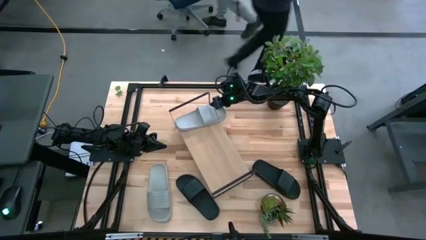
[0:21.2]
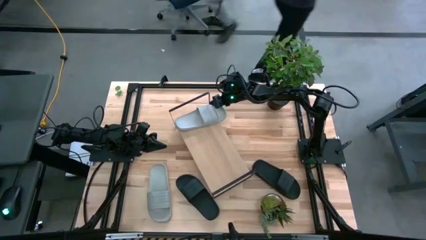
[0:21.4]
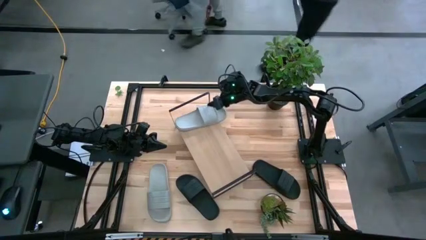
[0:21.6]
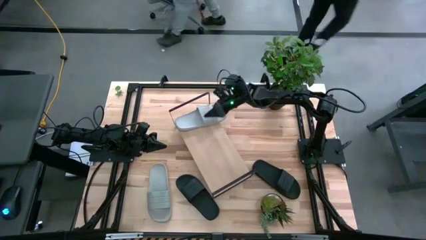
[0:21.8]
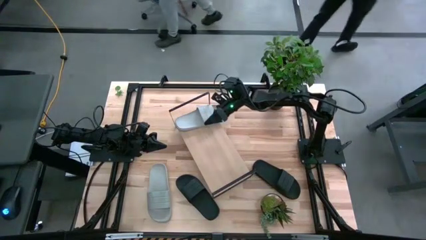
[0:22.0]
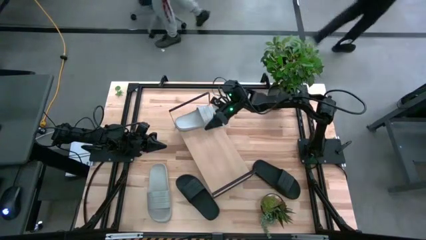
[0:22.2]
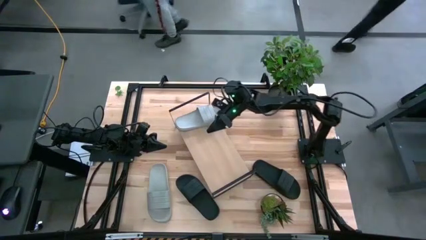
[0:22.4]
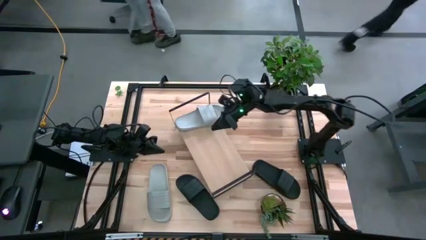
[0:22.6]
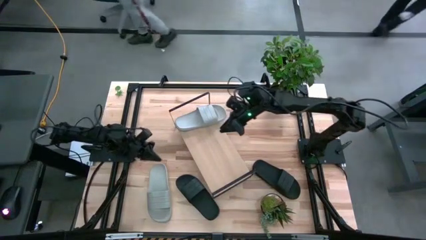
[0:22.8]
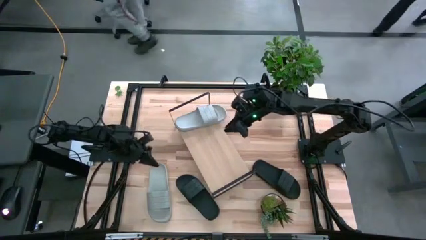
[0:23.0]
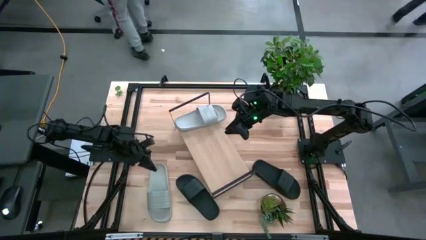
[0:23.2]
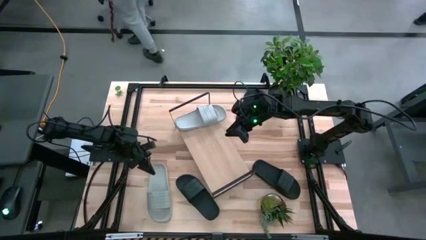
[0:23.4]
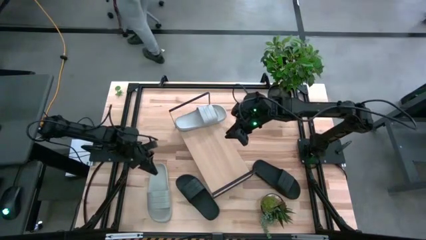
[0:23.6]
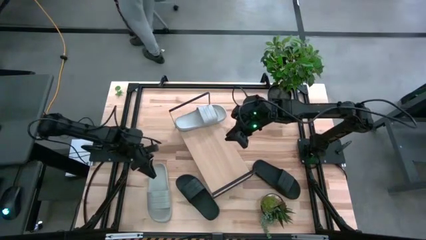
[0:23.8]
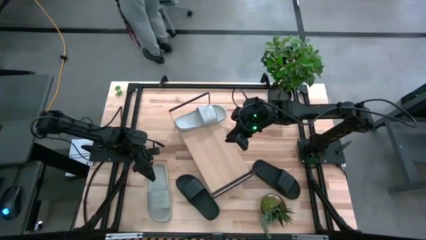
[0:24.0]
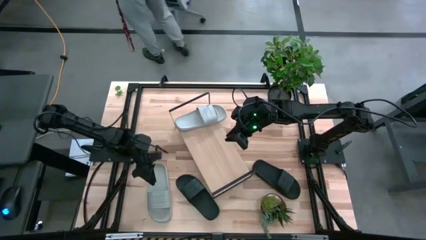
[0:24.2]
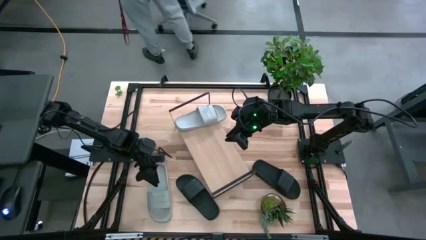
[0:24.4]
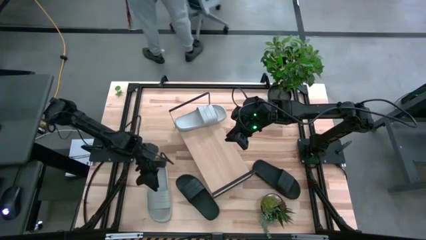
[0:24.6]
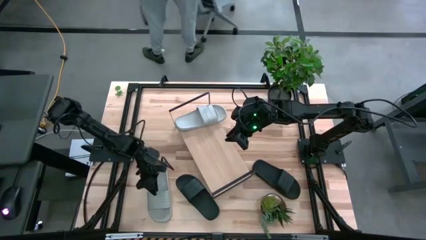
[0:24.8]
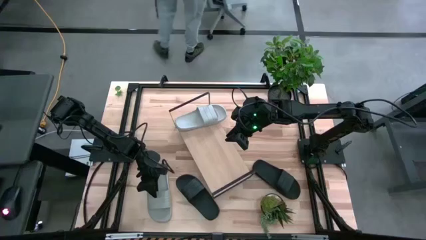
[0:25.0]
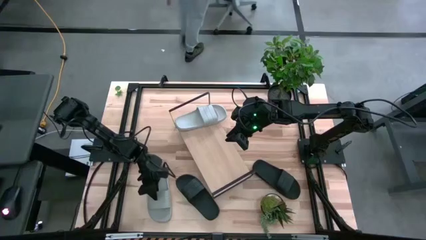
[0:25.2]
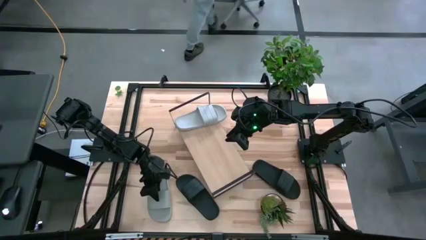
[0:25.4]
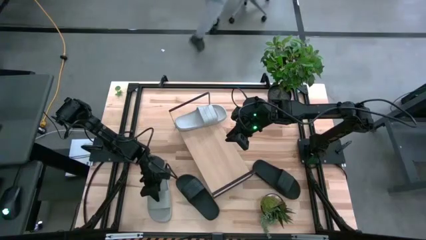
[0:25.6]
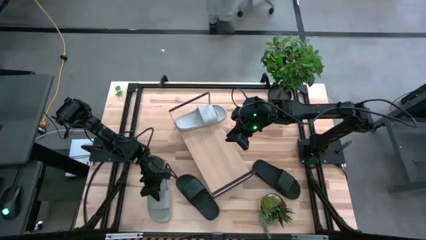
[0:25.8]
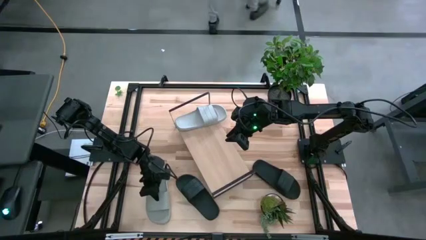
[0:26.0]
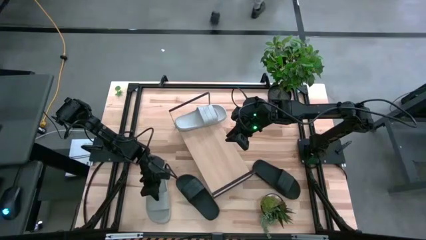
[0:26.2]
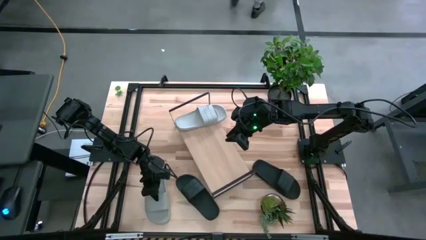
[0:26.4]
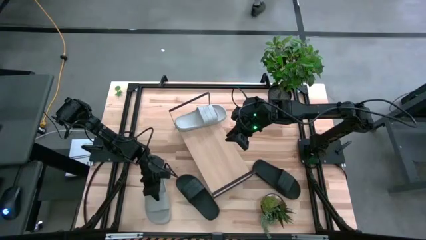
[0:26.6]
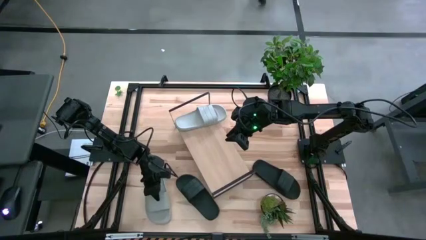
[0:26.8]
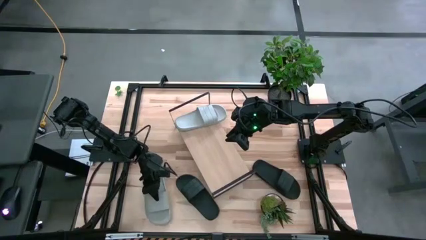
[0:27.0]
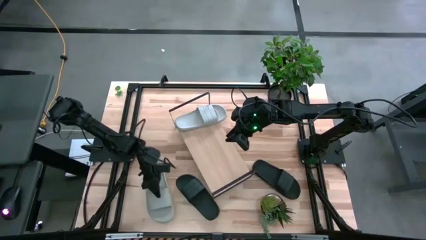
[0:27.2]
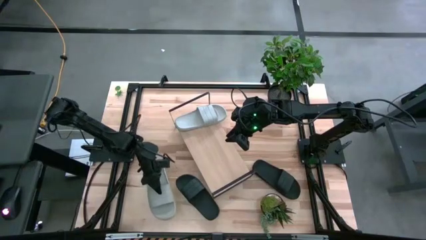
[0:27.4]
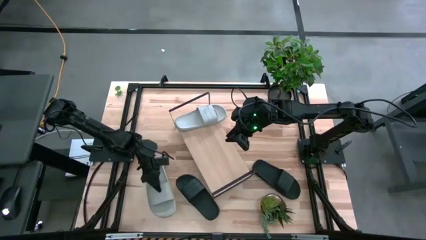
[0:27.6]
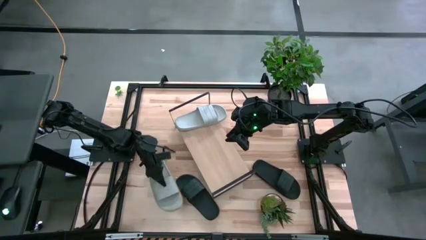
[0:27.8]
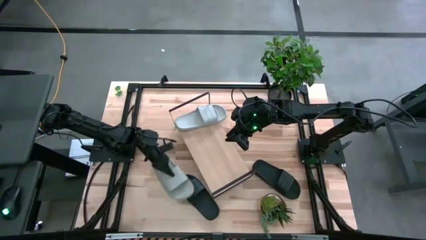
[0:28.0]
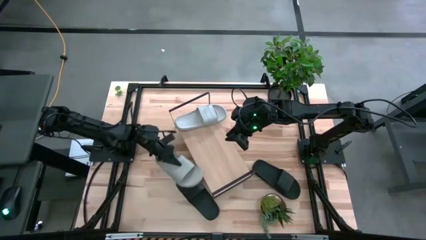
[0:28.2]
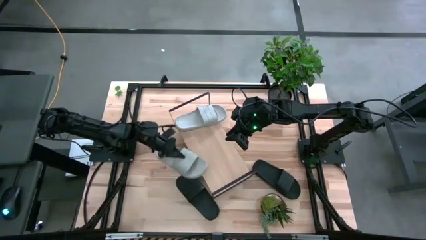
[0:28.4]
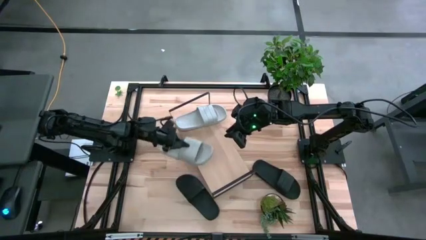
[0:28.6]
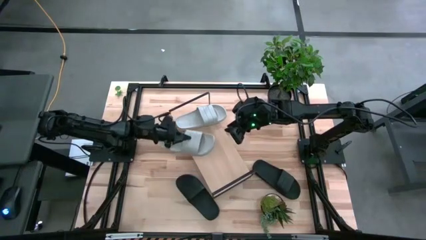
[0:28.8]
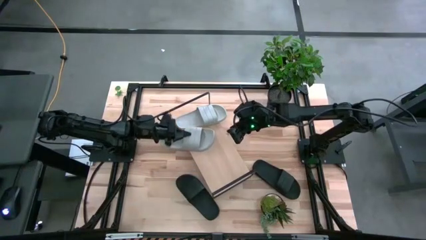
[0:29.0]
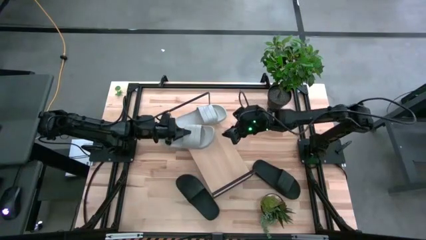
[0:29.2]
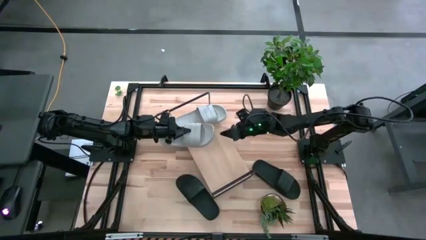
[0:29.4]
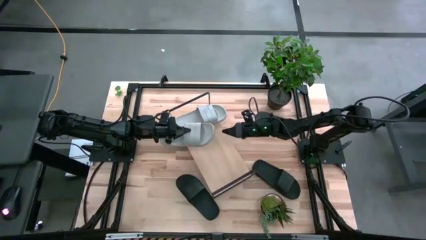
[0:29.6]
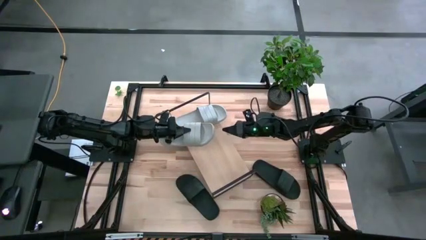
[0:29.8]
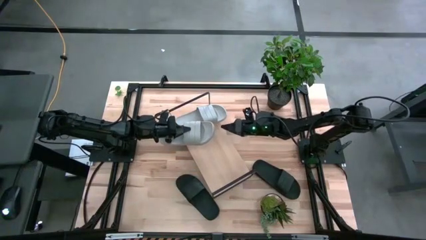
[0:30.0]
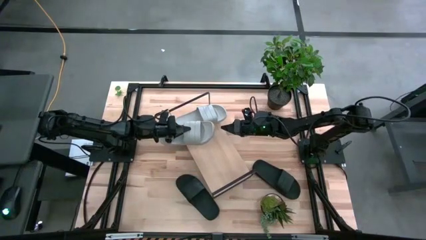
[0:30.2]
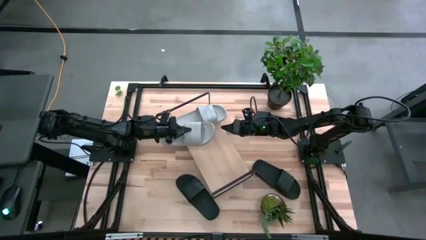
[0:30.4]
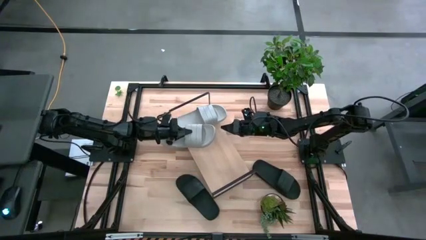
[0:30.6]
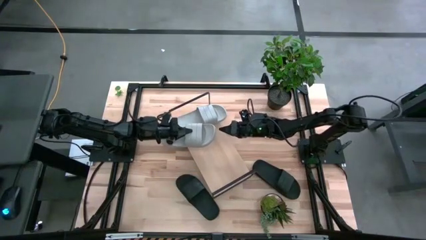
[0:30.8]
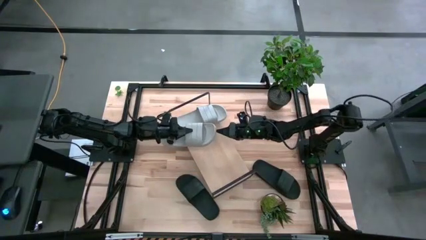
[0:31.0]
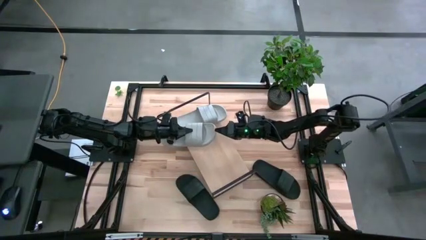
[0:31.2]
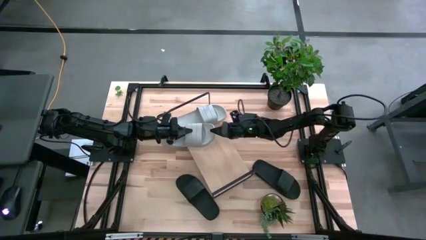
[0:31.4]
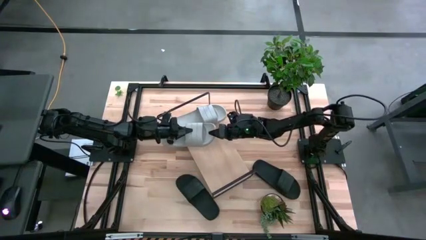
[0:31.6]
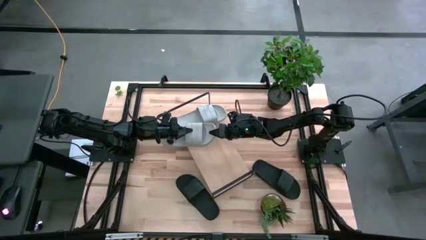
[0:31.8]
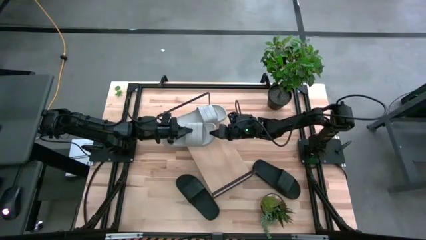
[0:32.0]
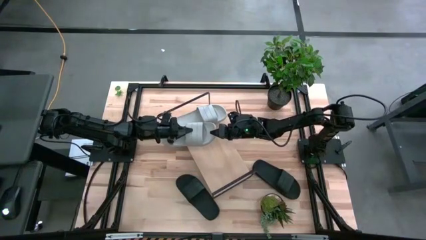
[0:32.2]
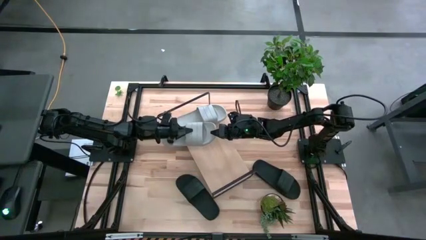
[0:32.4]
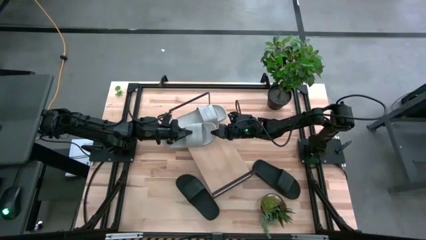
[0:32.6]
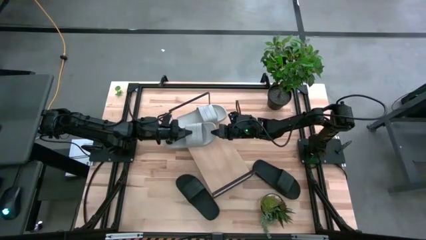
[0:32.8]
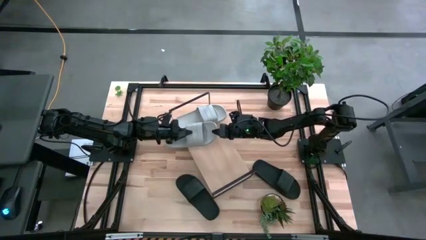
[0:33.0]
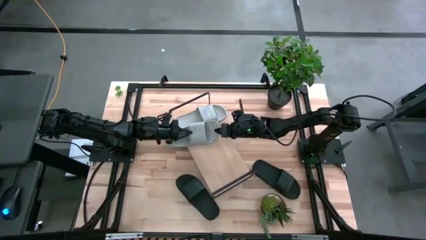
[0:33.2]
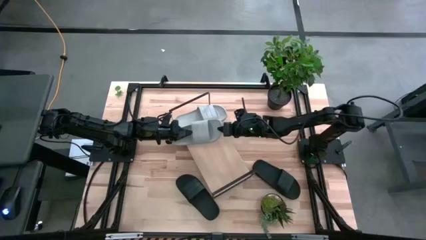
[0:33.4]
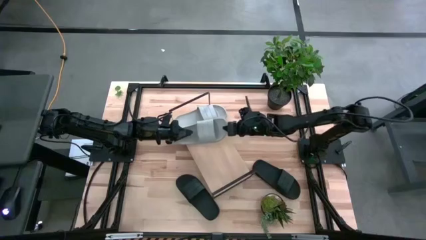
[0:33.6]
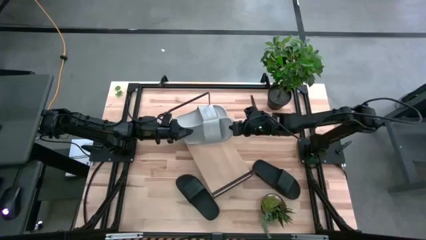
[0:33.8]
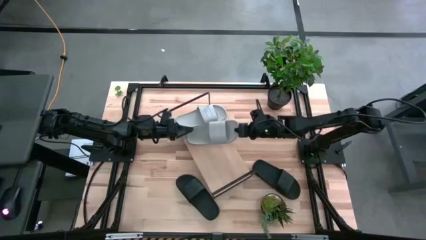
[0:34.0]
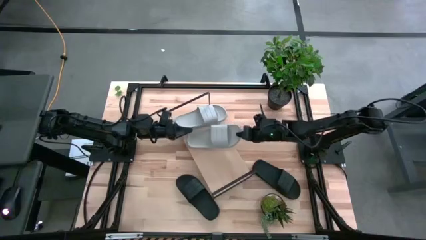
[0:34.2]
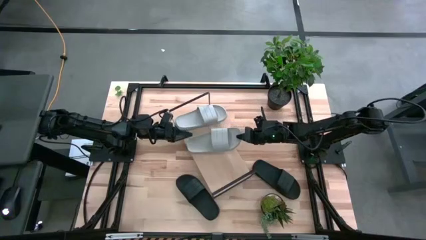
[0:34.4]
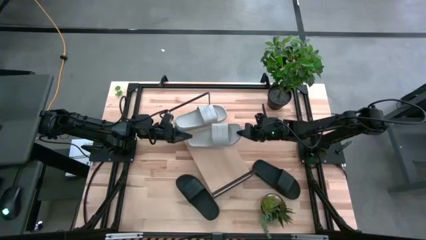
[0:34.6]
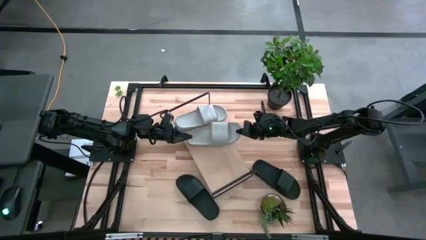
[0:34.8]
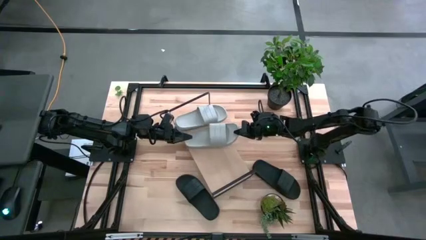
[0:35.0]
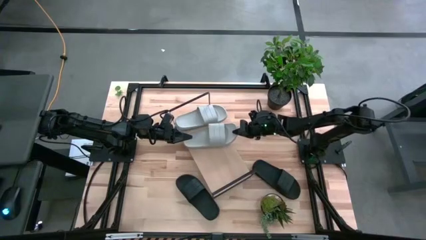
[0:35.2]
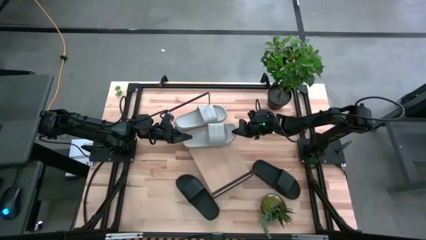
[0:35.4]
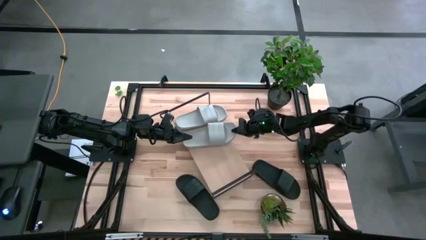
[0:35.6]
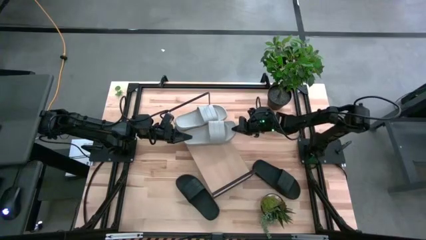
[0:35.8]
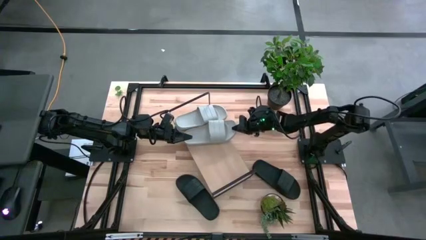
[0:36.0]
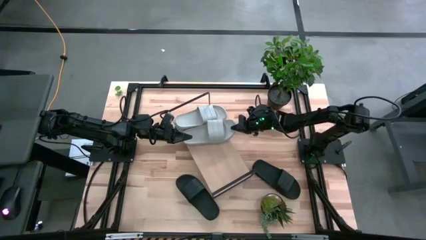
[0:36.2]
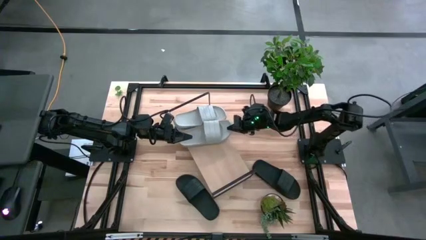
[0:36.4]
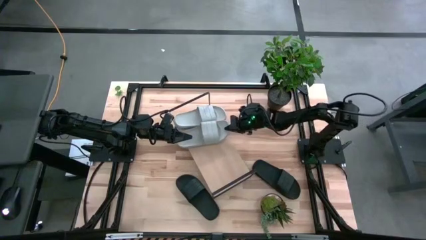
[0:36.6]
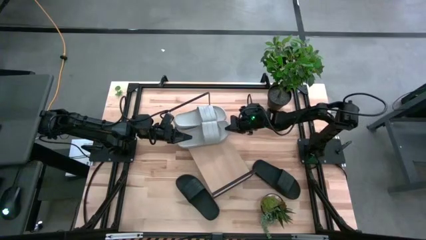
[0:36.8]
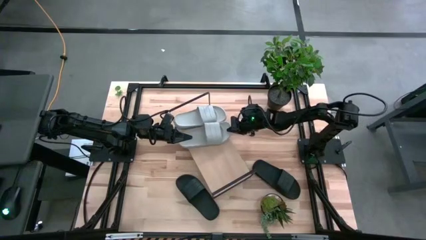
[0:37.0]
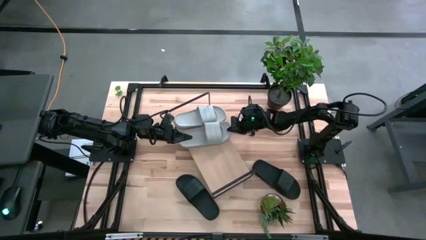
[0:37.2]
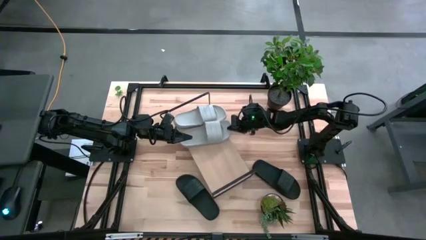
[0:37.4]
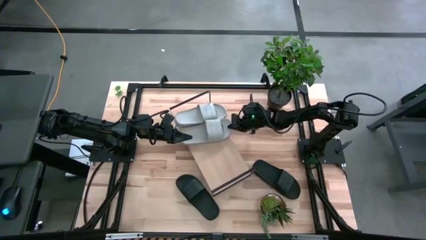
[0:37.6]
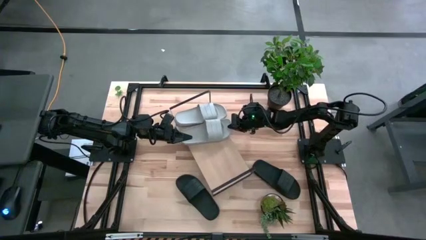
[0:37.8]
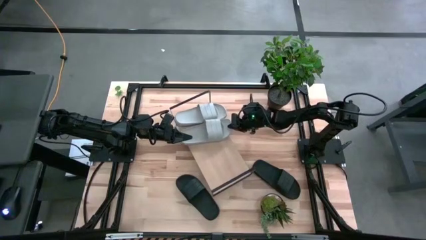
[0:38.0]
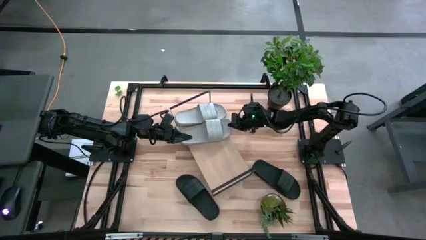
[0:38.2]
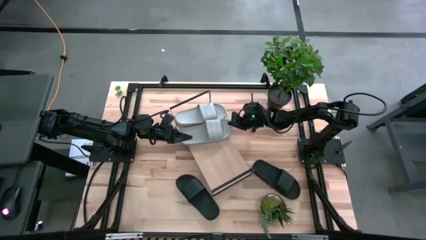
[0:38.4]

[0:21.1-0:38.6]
Task: Pick and place slides into the shelf
Put the gray slipper on the shelf
